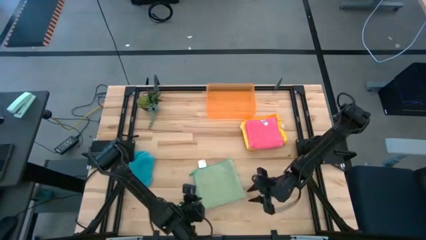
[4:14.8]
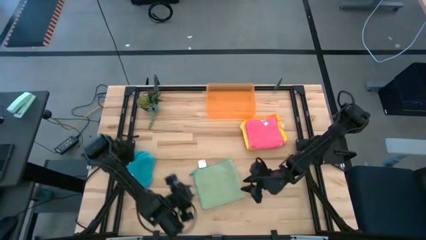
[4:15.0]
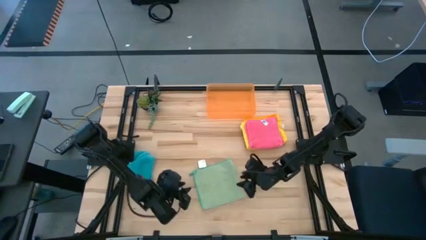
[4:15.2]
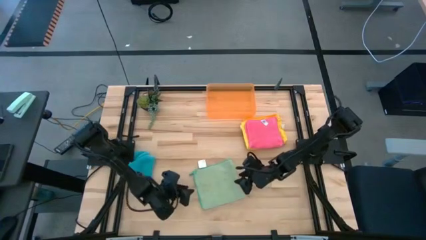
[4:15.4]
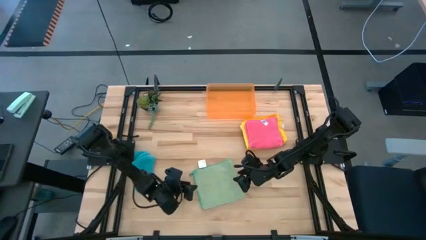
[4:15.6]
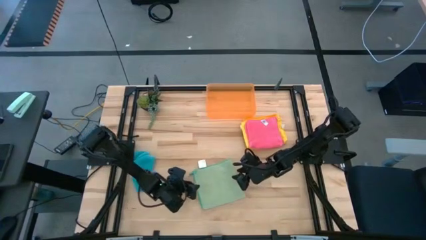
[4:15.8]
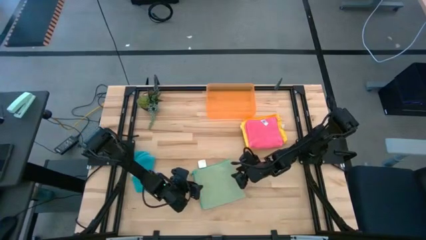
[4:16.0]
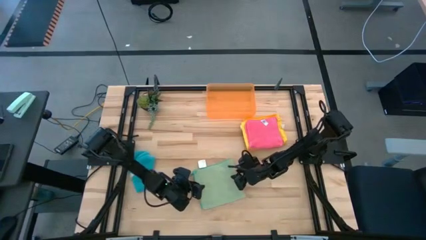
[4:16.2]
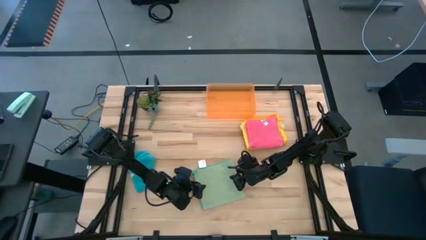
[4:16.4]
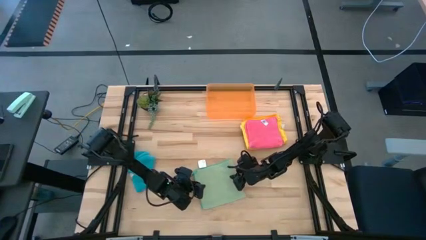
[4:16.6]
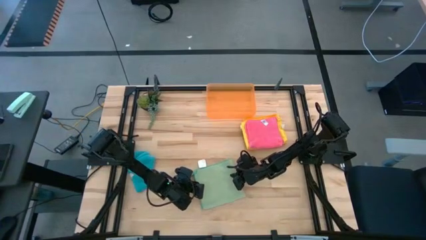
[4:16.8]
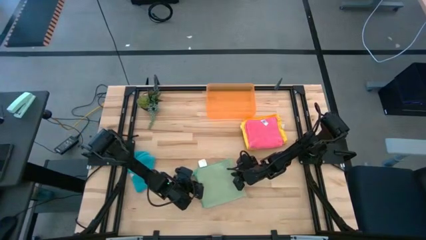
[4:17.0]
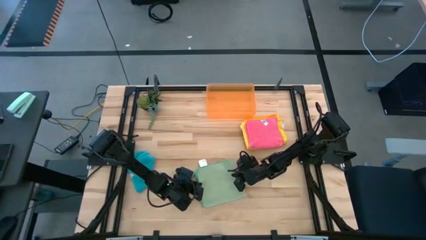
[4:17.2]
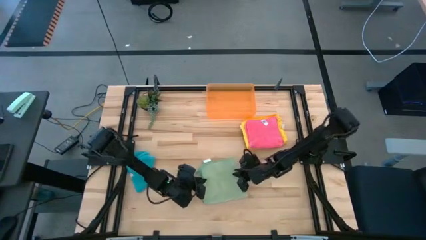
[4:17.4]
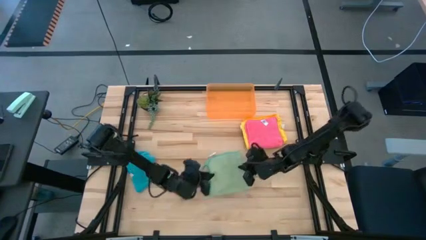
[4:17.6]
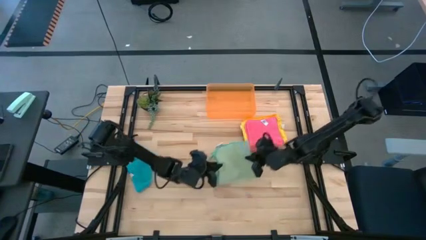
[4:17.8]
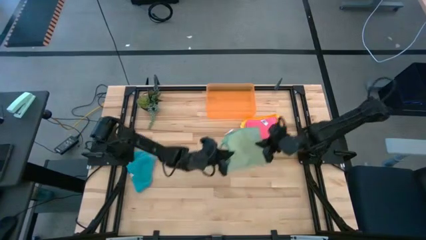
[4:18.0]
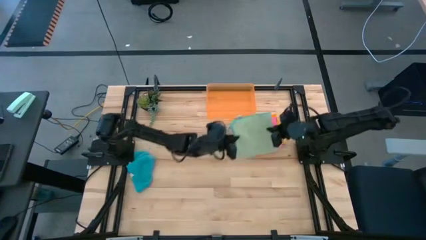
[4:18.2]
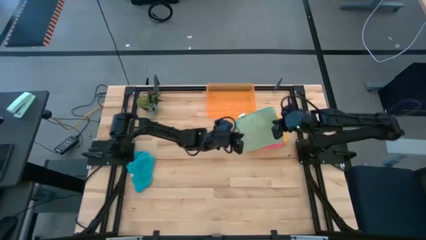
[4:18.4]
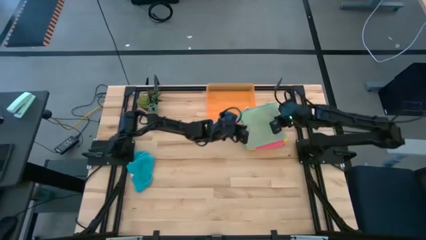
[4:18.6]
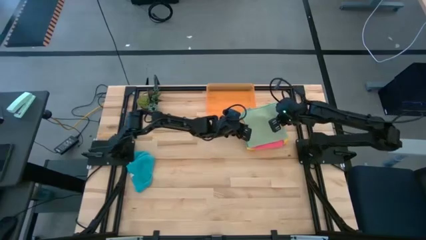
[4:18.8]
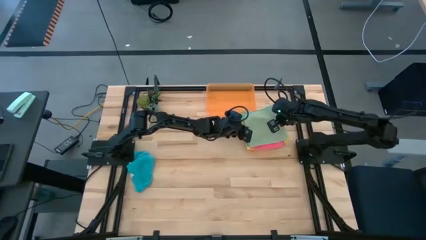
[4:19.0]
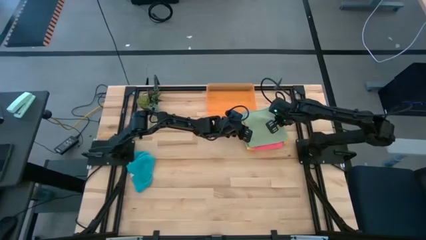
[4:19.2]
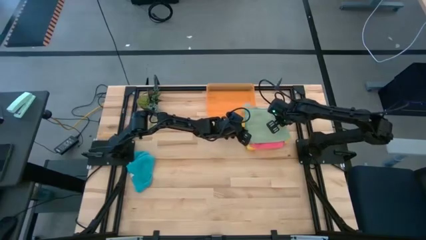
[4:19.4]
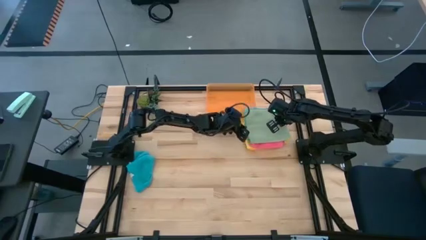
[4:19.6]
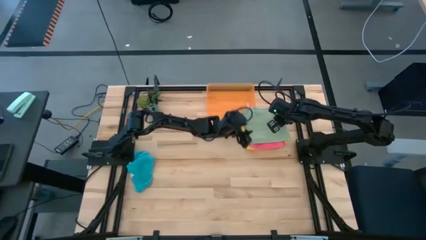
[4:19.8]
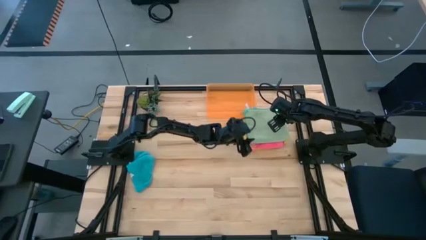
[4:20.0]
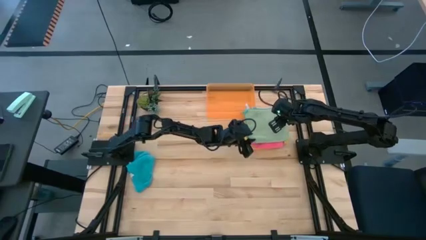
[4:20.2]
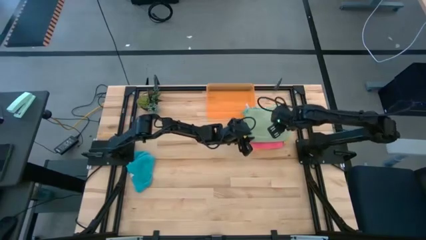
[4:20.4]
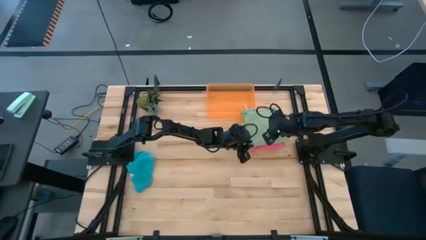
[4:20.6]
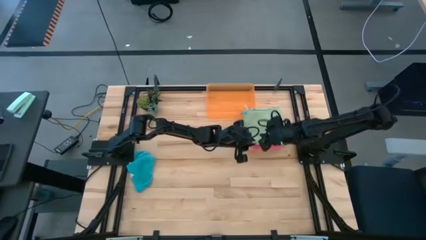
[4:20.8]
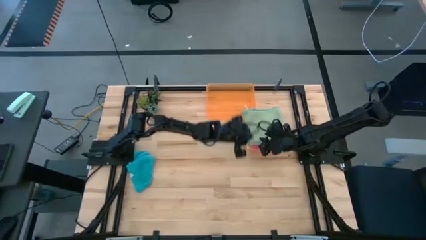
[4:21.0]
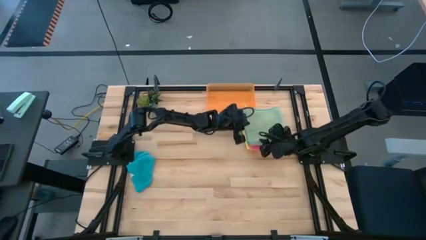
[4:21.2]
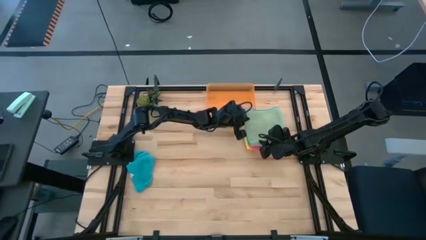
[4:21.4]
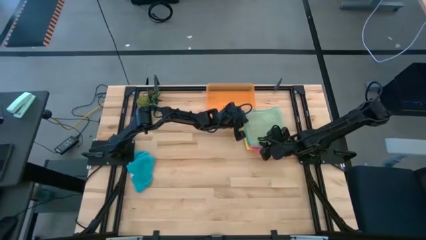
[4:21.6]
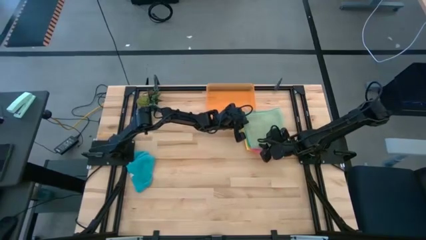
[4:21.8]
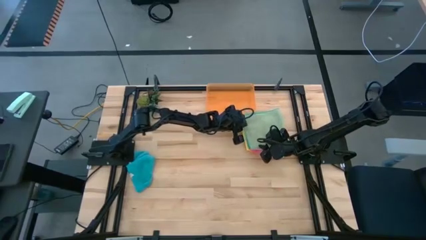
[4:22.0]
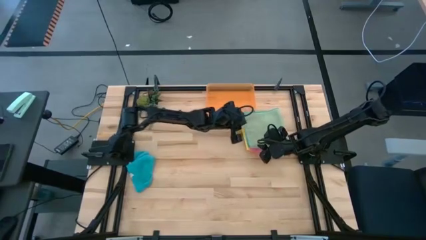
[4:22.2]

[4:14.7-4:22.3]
Task: Fold microfiber towels
Stack the green microfiber cloth on top of the pink microfiber cloth

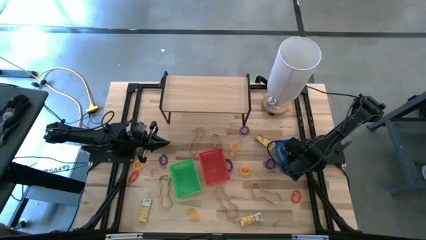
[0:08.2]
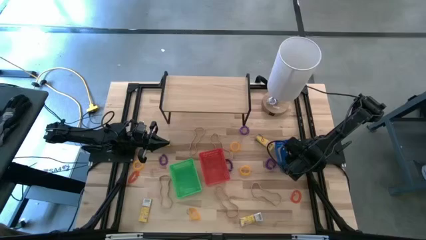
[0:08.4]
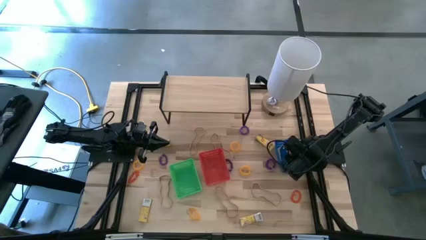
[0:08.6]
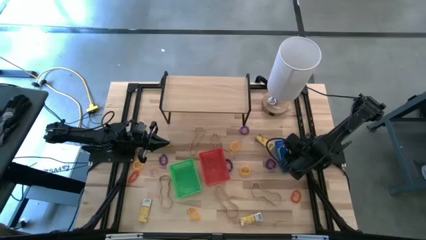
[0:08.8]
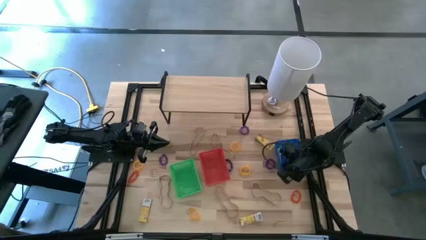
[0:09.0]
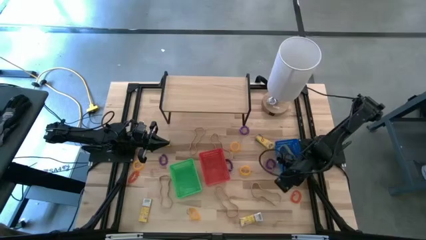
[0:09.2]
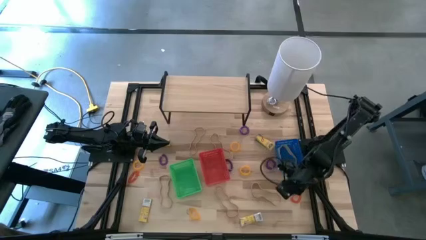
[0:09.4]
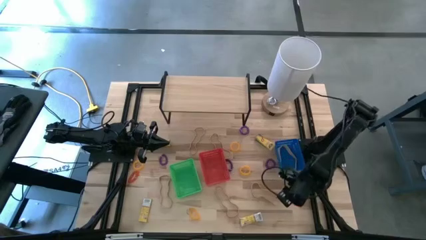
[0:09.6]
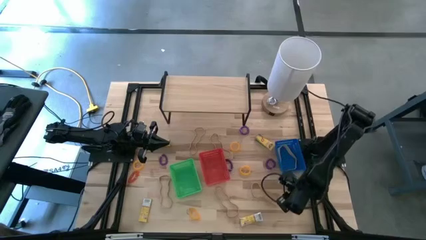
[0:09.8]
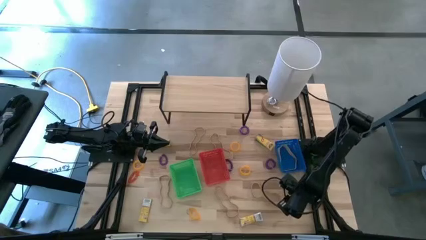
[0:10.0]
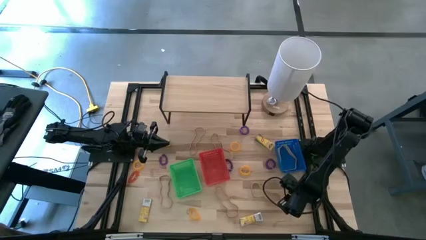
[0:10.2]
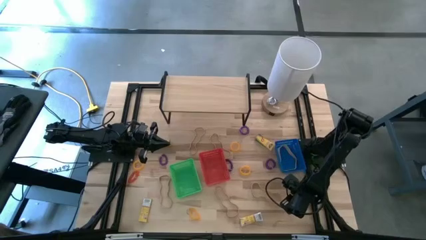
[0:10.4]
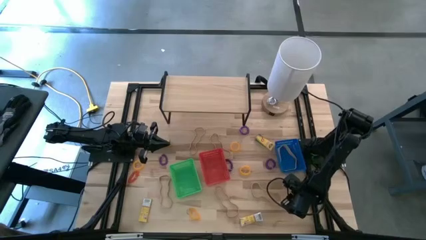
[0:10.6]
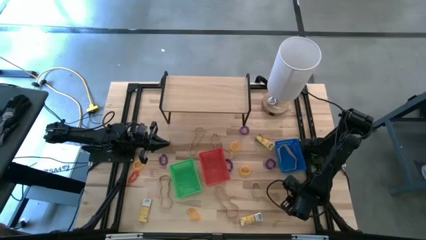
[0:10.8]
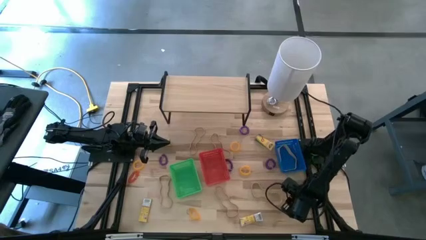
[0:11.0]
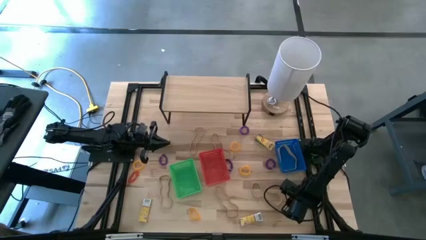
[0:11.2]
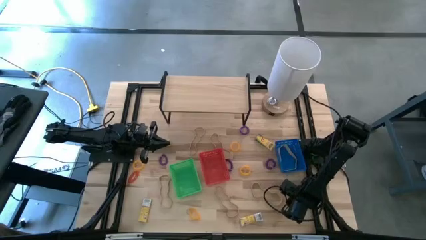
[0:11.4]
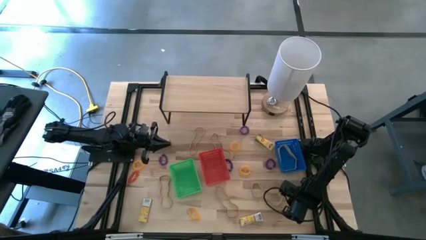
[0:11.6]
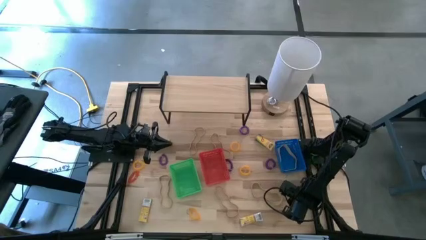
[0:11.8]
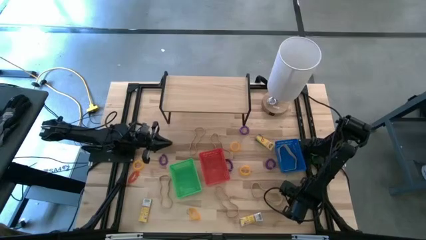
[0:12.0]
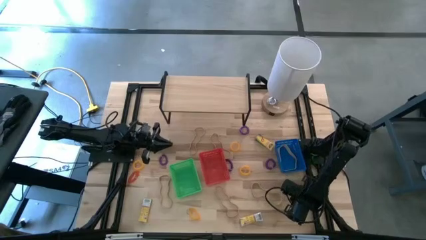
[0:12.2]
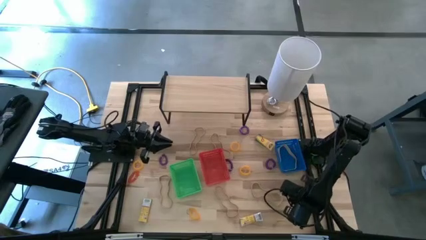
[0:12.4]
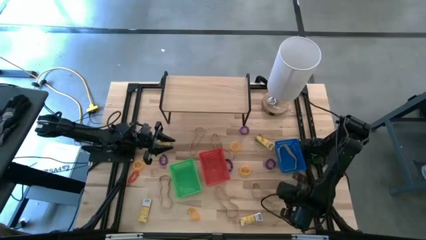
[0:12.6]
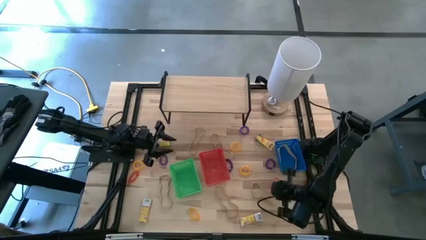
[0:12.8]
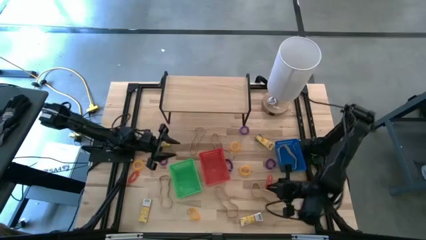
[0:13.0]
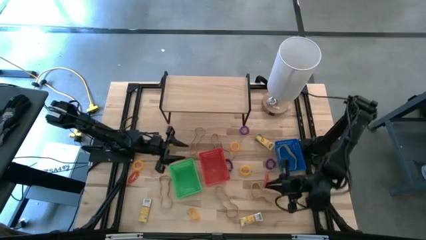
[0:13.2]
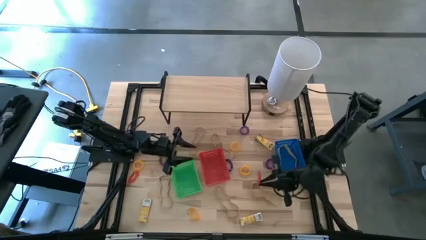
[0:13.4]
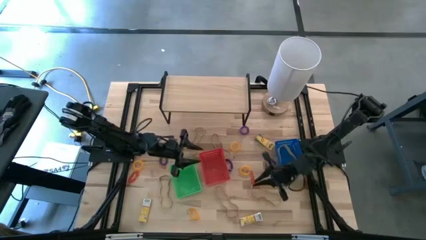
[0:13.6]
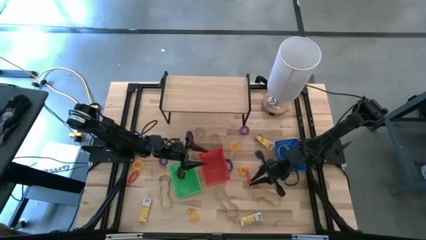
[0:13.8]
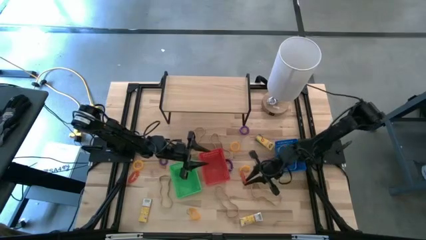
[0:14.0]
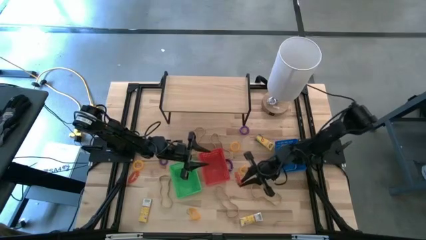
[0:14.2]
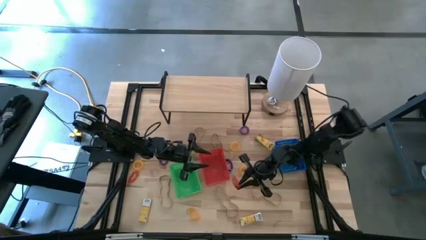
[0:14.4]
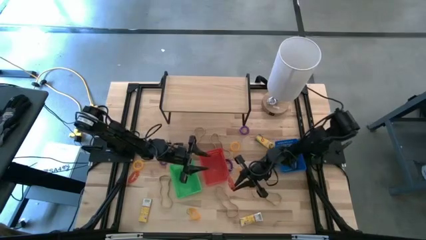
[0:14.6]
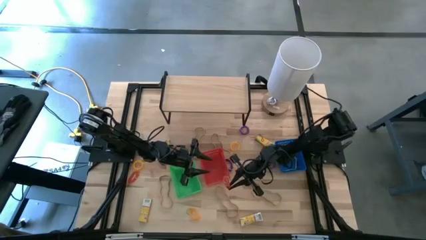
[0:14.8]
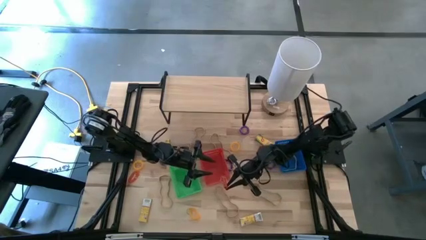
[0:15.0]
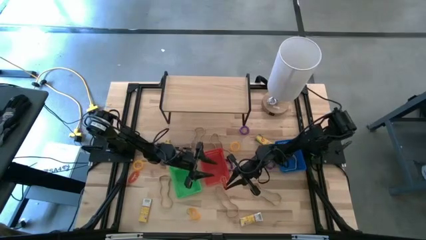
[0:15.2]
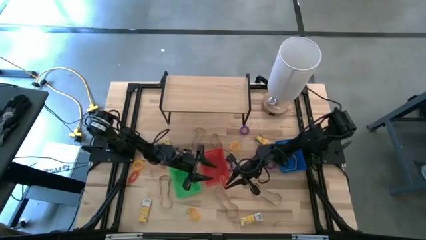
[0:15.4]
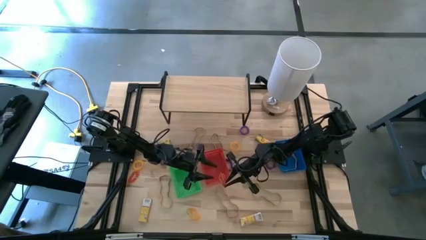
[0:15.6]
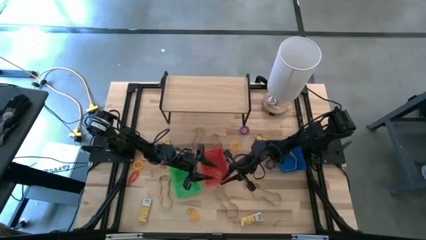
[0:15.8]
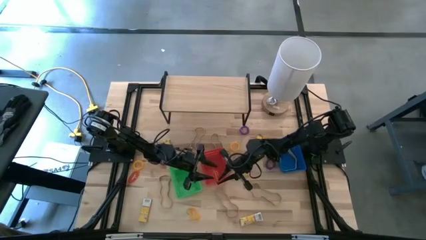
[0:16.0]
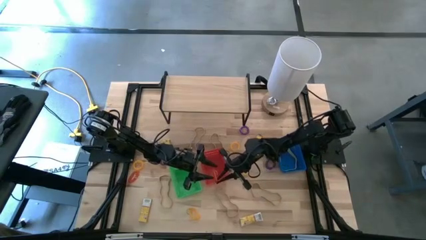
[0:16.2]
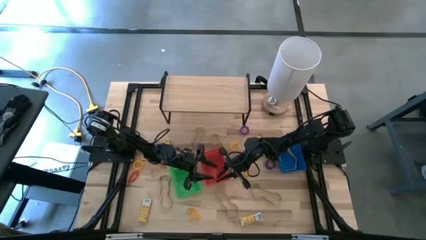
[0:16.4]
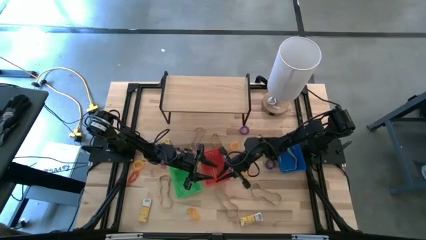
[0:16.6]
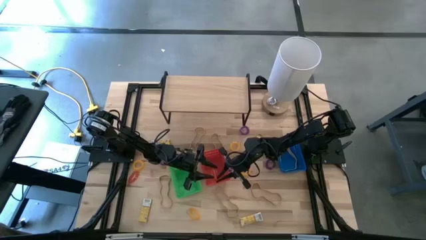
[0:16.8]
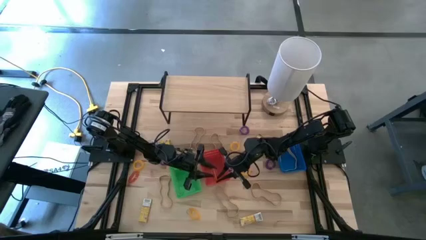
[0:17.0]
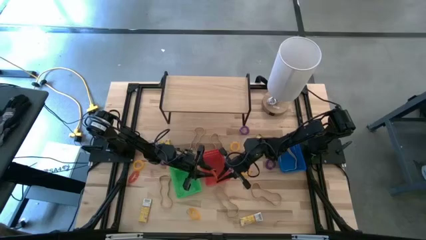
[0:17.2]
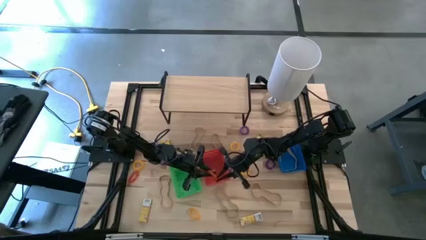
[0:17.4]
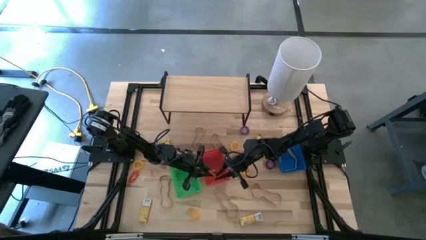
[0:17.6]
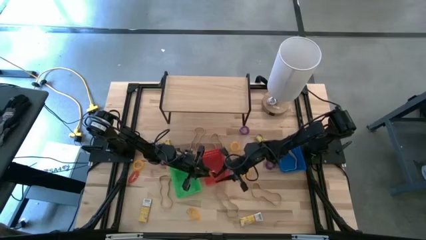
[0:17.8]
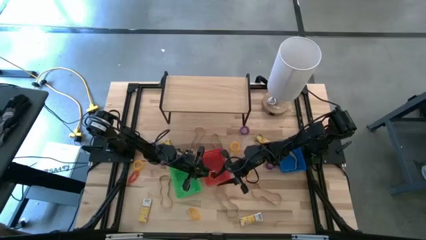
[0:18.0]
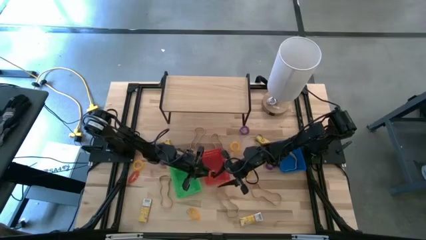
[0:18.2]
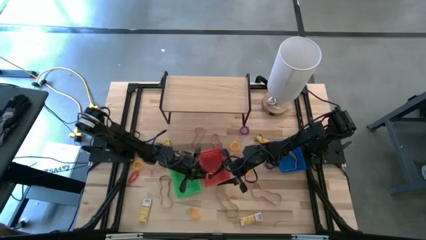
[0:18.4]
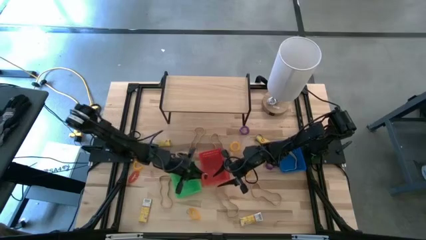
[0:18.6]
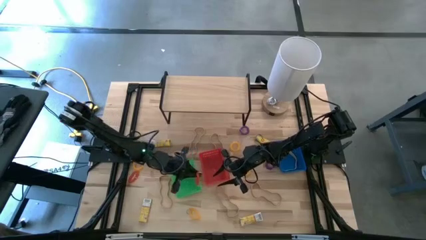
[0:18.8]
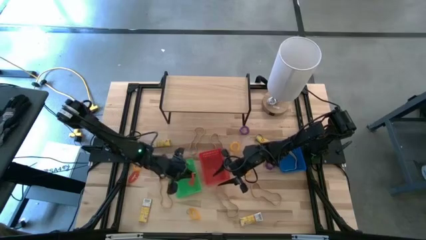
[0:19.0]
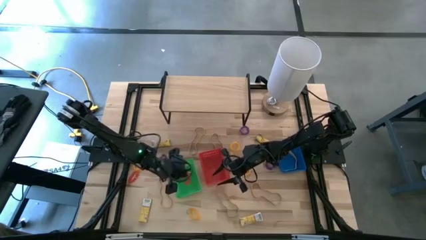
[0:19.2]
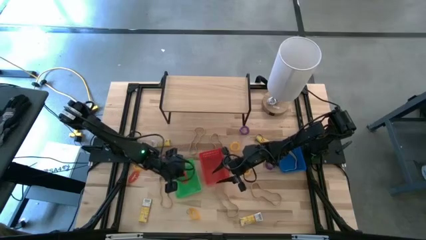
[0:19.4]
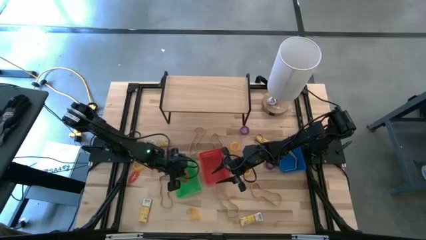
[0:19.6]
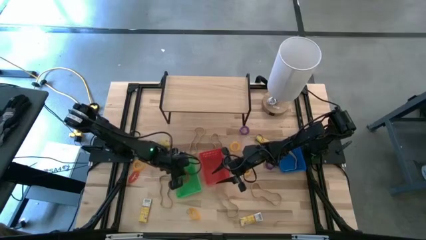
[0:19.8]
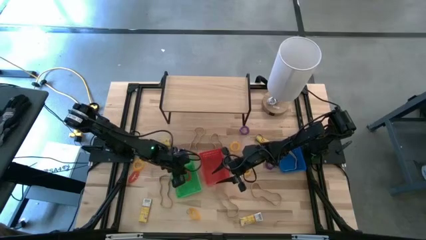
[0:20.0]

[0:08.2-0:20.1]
Task: Pick & Place Office Desk Supplies
Put the orange spring keychain into the green bin
